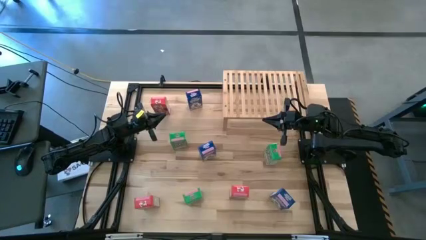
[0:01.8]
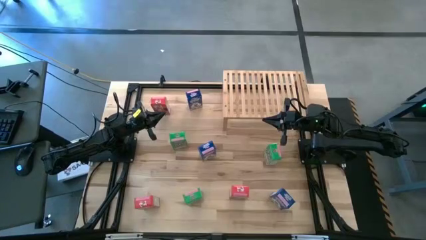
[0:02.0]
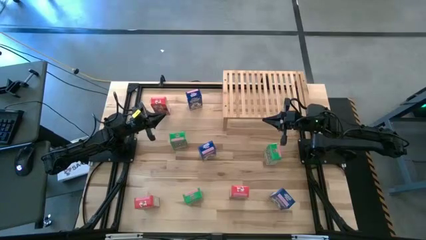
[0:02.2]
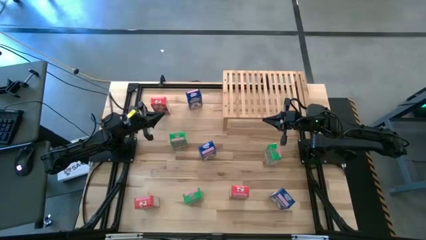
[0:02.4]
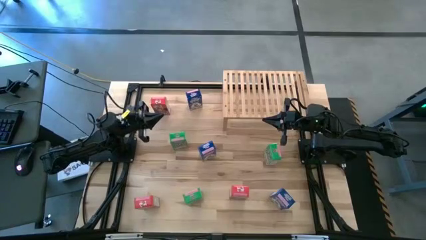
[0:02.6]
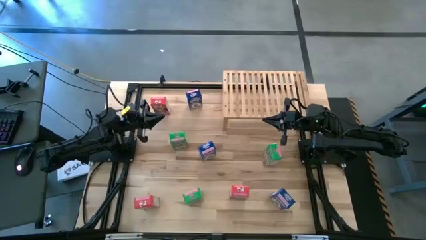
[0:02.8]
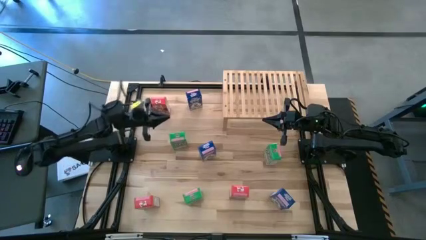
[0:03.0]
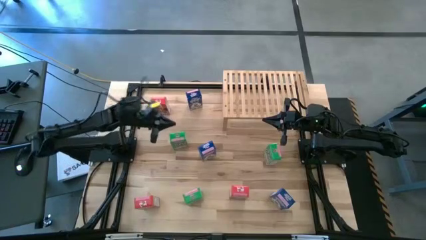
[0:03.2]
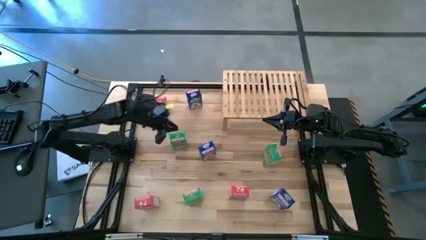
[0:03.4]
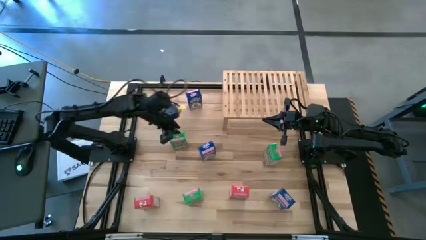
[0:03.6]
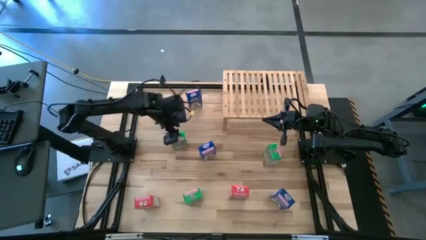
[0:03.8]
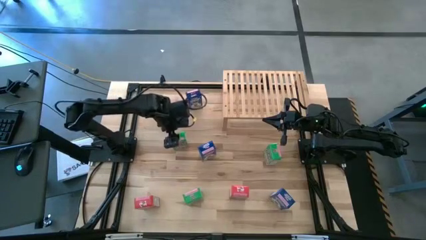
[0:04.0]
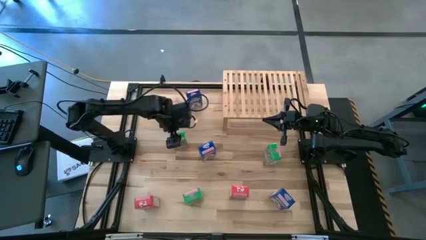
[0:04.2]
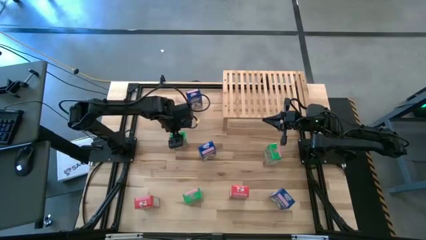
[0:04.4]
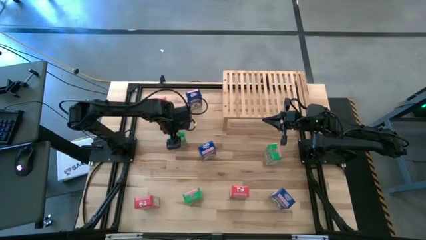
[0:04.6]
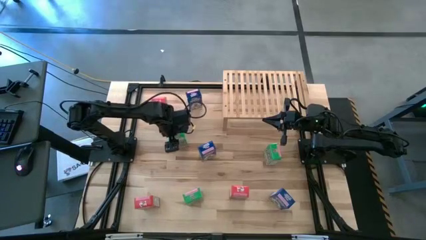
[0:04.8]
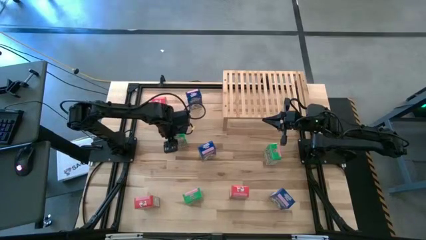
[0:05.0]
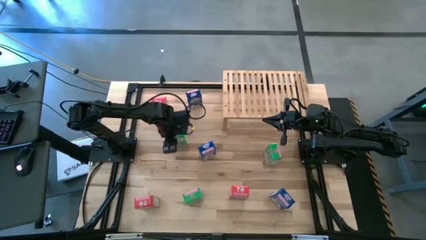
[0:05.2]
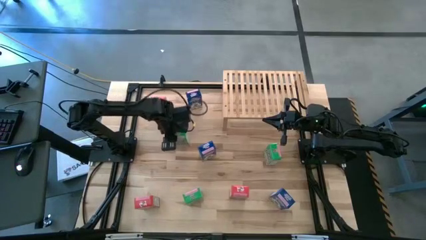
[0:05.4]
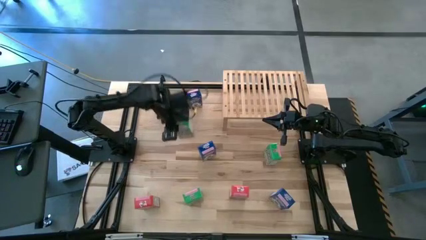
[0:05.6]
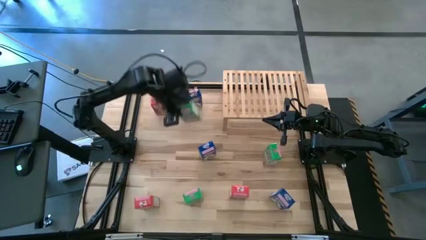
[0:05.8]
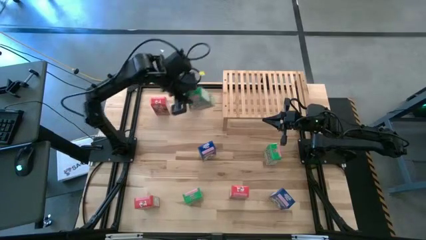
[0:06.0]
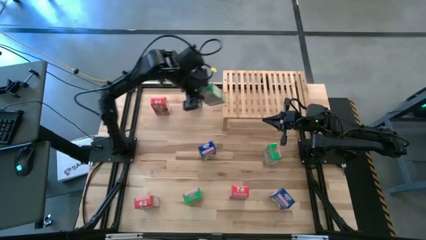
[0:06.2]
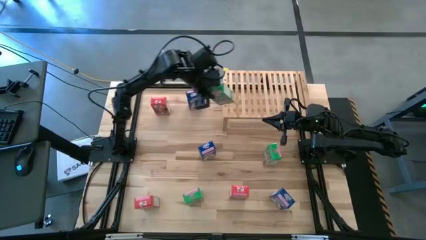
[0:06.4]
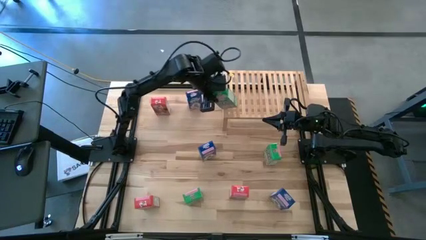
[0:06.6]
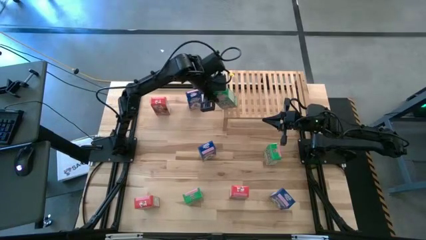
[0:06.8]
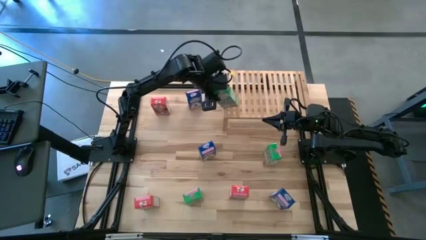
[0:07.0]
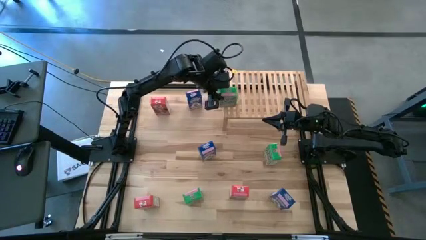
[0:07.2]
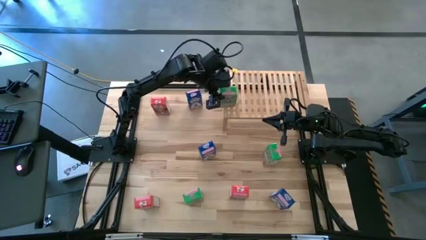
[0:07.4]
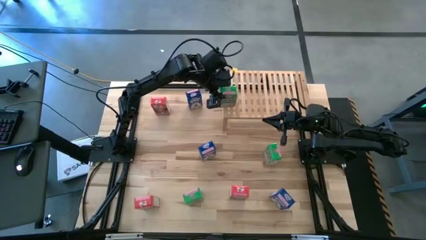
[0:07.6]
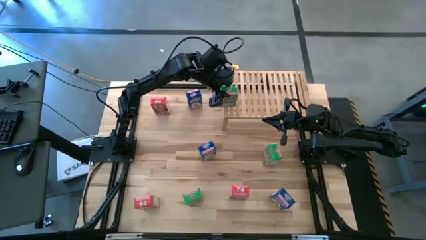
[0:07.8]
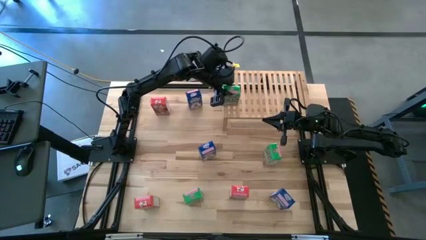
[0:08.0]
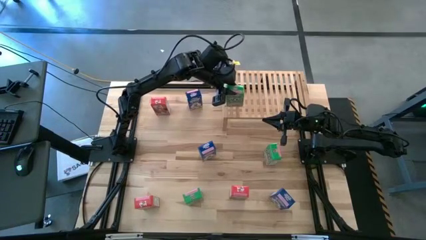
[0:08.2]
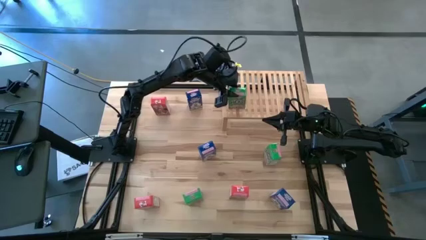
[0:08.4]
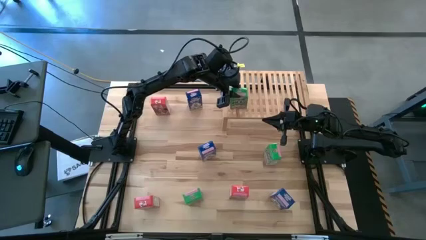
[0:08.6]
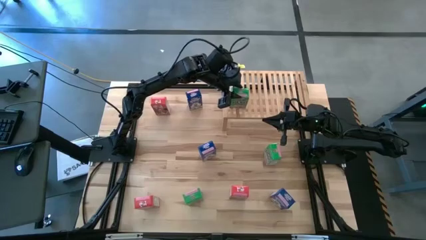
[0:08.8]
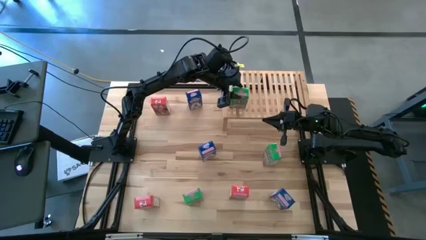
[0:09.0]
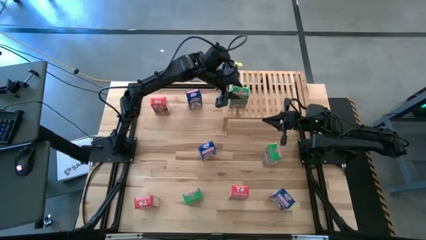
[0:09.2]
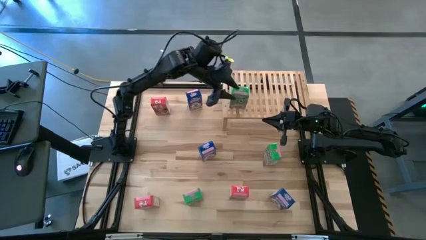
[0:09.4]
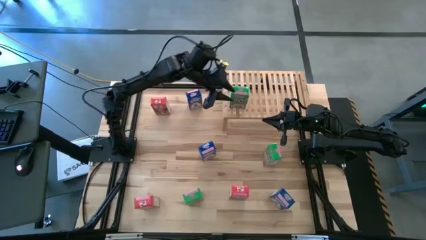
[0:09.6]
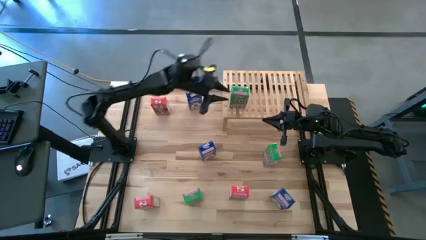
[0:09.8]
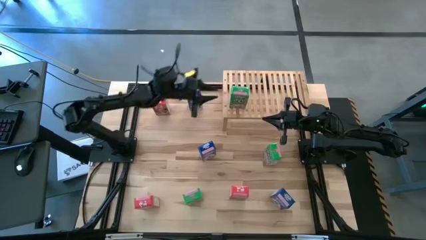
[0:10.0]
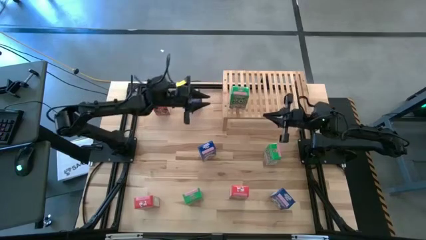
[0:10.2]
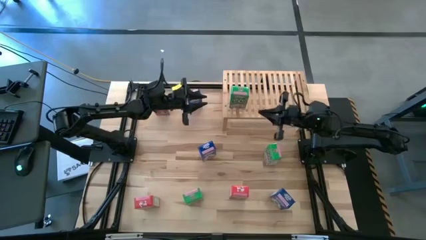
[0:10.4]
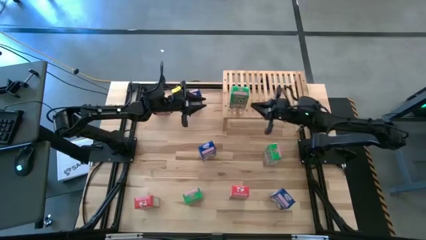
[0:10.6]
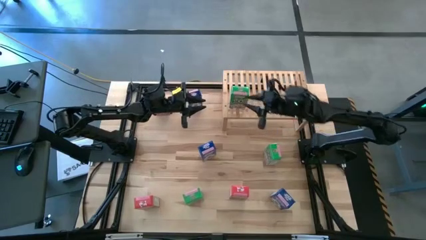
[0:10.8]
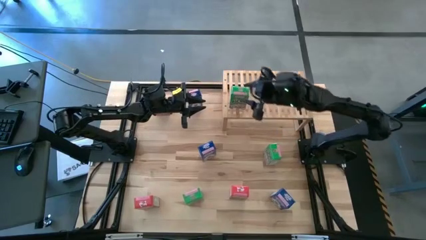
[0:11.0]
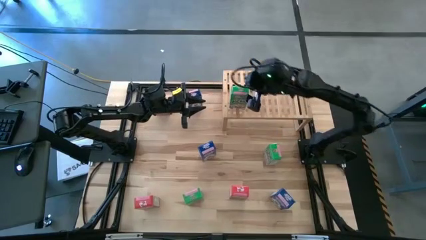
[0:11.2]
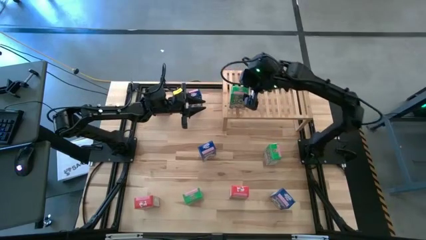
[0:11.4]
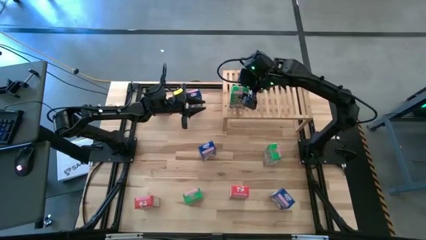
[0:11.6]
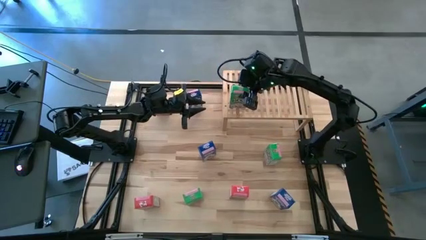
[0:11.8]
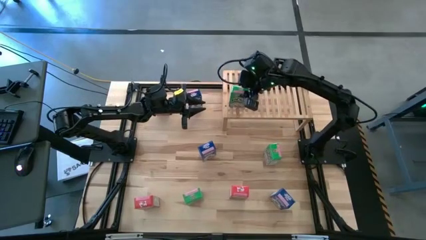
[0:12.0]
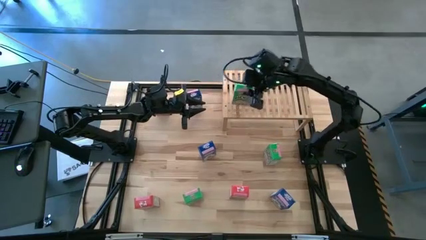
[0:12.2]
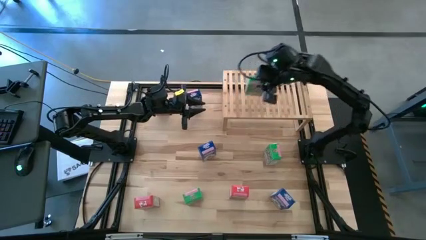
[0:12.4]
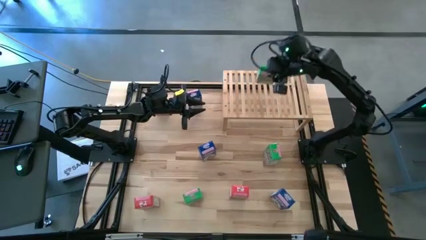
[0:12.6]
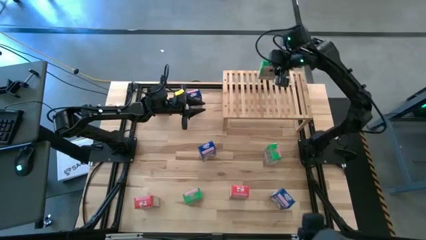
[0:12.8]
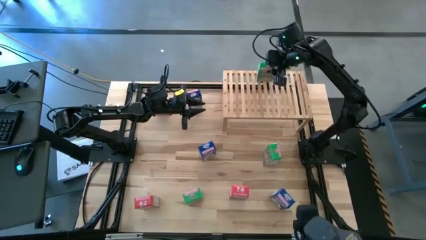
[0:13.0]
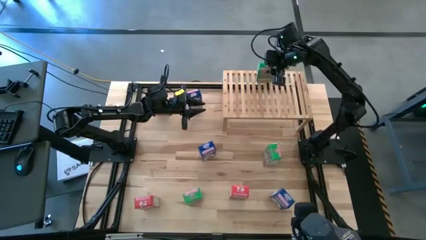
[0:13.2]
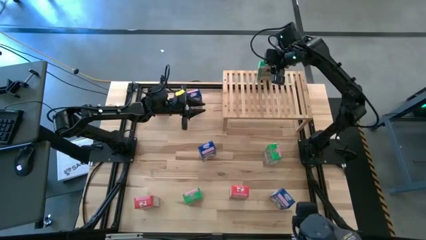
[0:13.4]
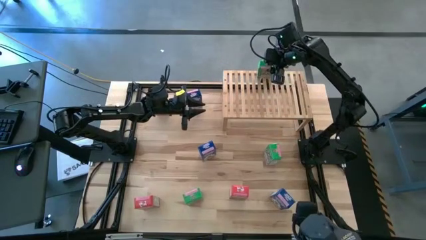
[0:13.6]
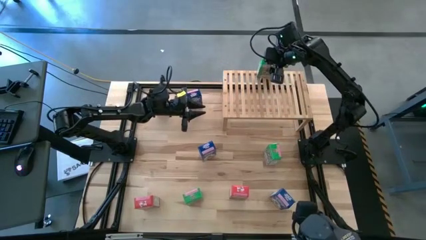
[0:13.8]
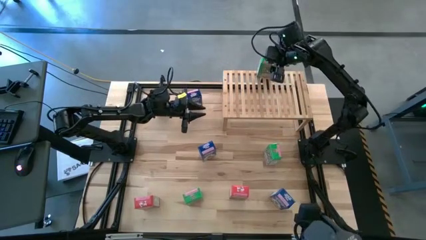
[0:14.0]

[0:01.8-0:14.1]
Task: Stack cereal on shelf
Put the top left green cereal box on the shelf

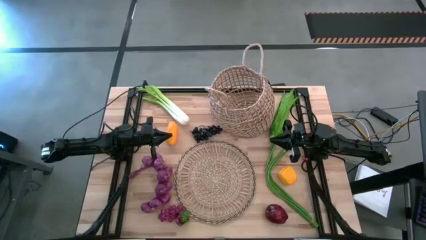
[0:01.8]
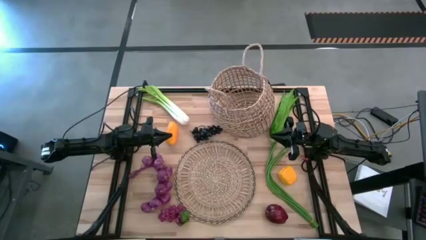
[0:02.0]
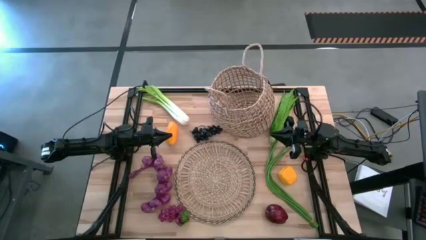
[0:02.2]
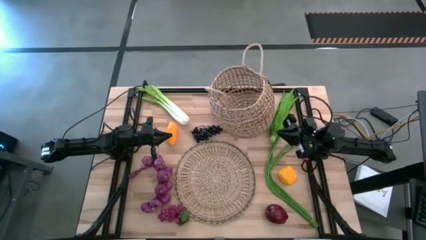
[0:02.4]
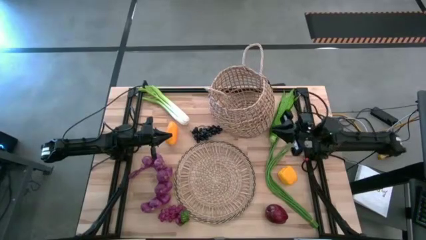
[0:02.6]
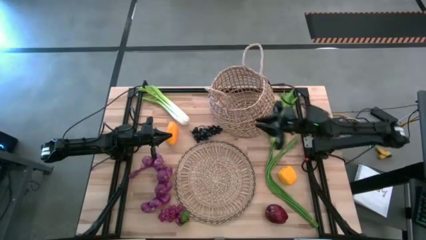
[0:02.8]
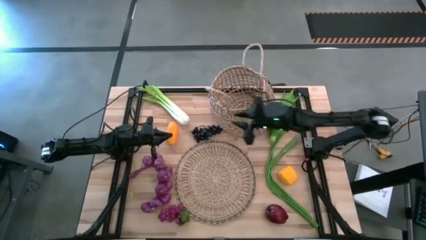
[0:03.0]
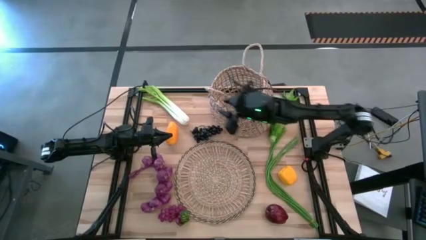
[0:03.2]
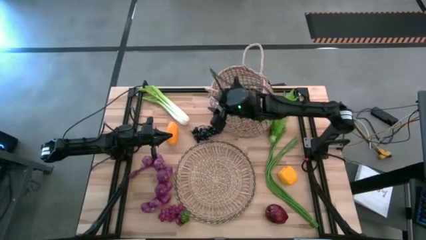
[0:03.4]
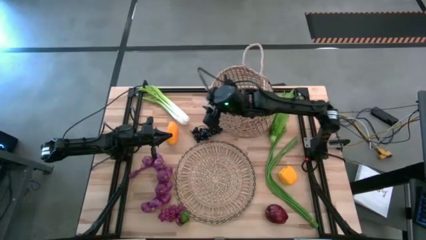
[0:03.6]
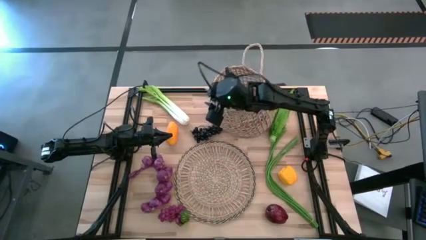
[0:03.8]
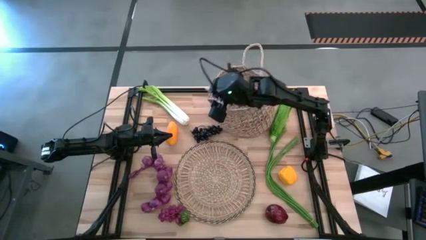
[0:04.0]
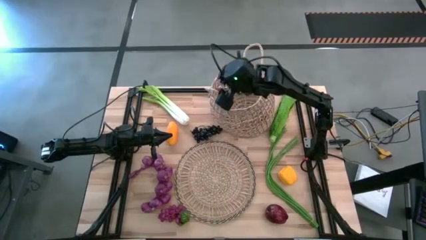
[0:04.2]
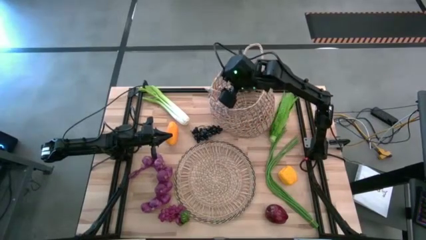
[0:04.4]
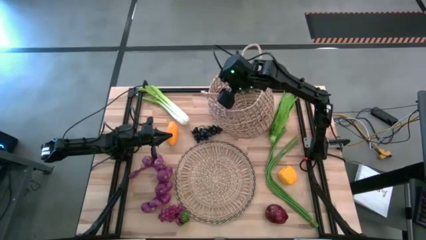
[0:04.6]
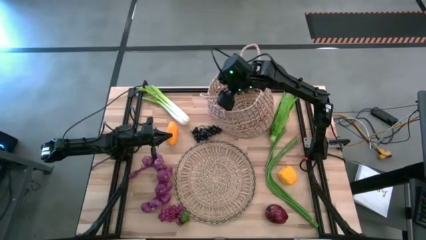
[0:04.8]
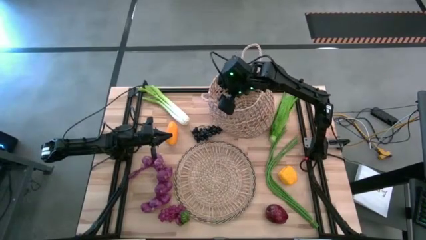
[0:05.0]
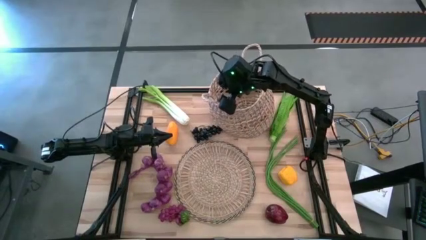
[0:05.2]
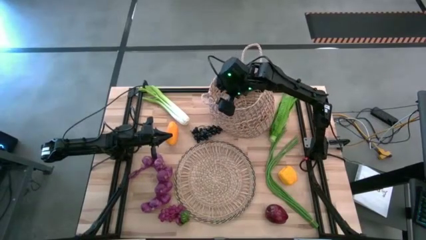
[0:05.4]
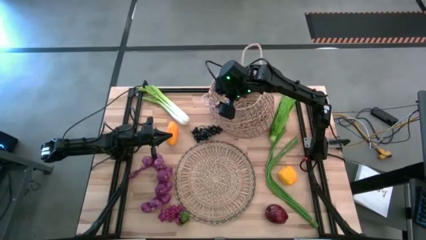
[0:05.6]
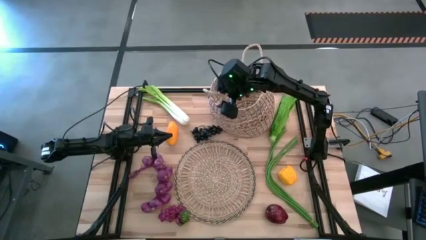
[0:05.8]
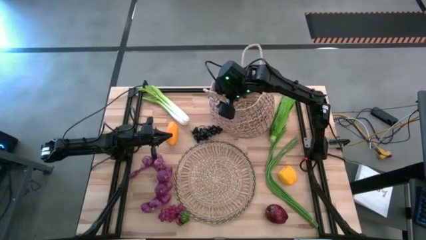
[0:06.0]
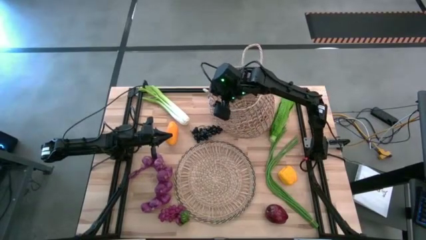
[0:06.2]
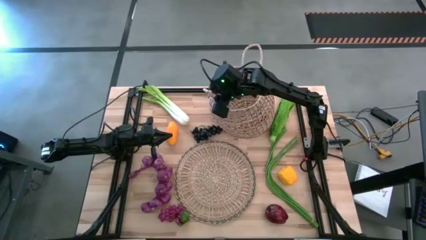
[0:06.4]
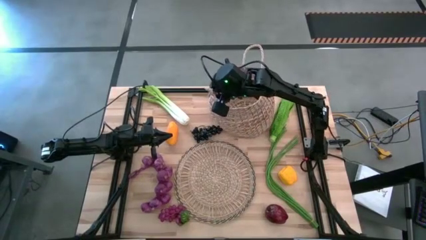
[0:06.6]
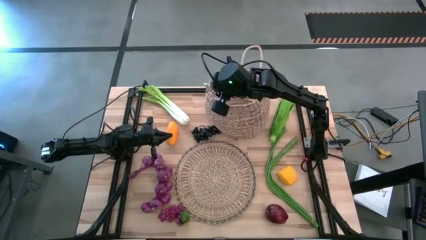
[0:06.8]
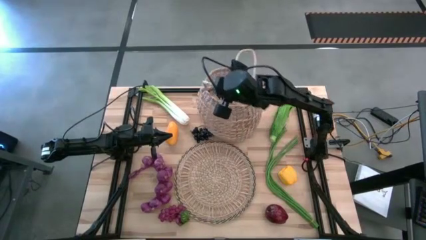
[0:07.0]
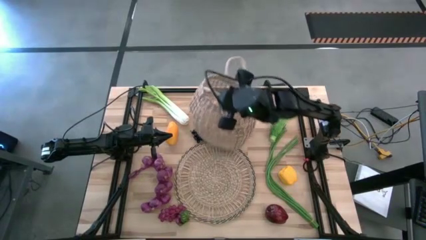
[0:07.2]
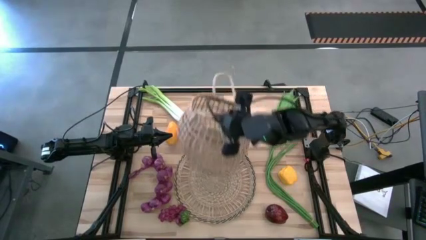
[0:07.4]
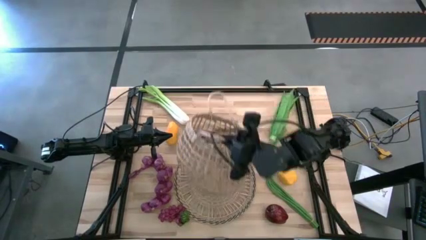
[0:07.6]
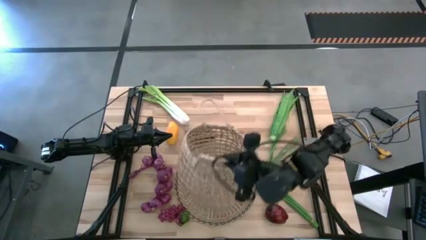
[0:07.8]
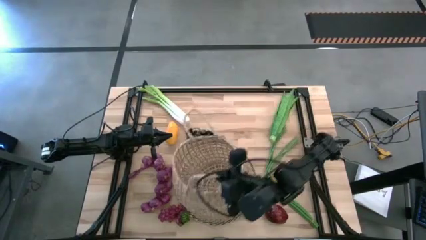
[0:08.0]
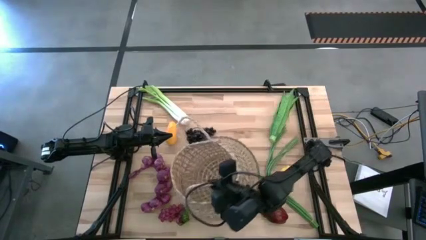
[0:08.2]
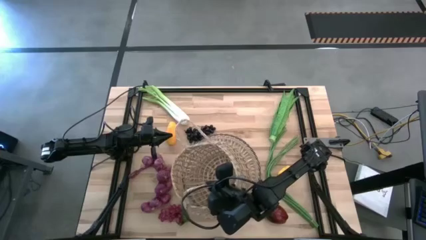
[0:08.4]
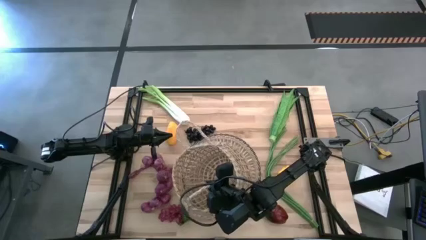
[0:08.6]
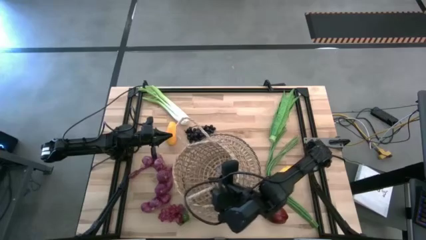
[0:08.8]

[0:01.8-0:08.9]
Task: Build produce basket
Put the basket on the basket mat
